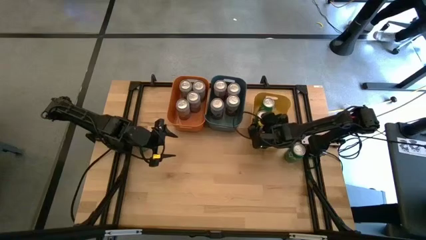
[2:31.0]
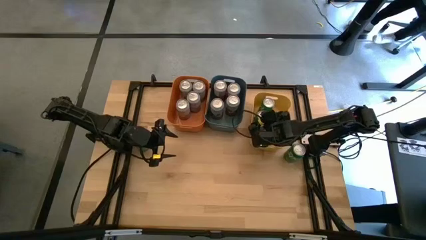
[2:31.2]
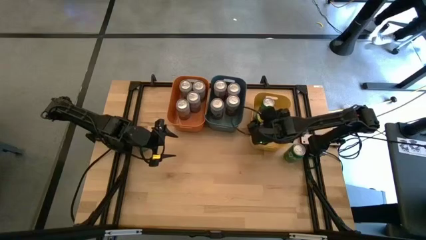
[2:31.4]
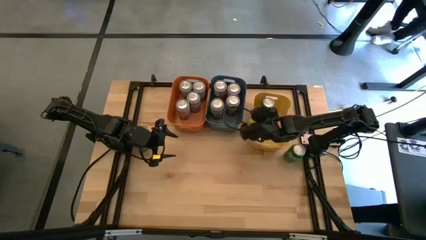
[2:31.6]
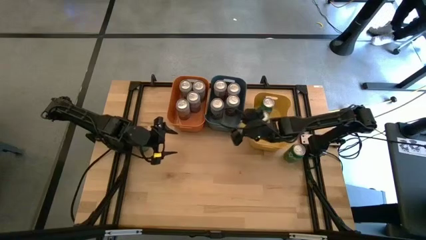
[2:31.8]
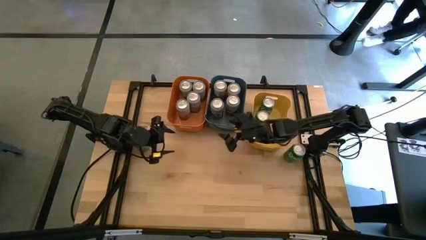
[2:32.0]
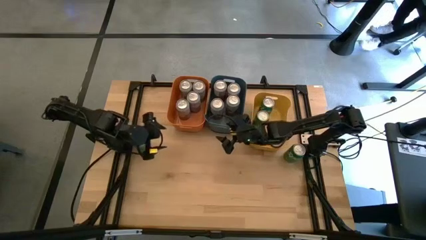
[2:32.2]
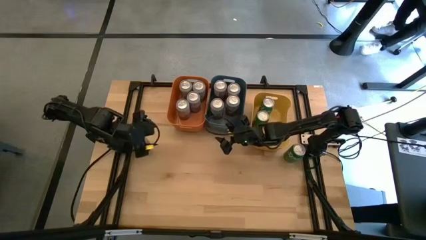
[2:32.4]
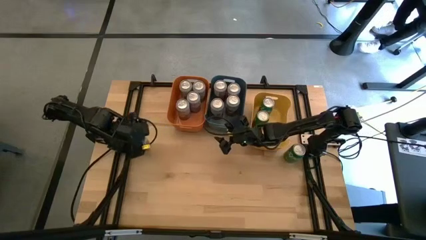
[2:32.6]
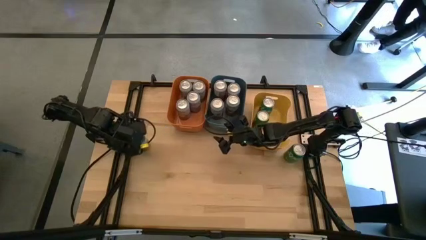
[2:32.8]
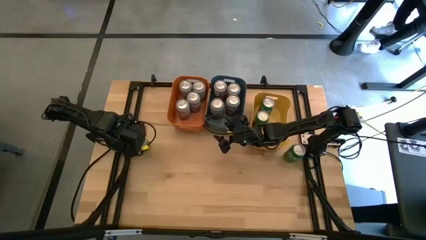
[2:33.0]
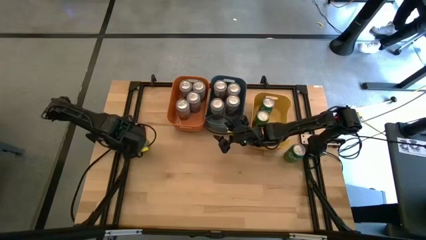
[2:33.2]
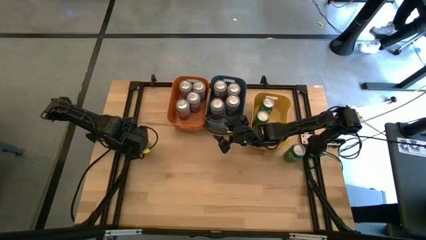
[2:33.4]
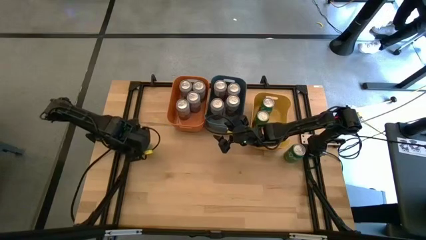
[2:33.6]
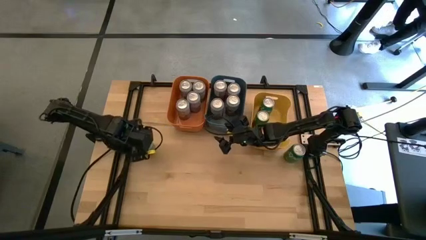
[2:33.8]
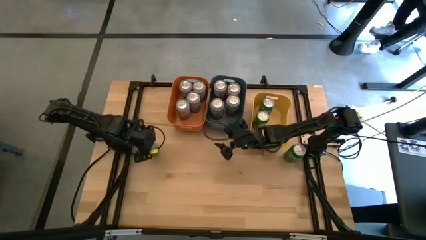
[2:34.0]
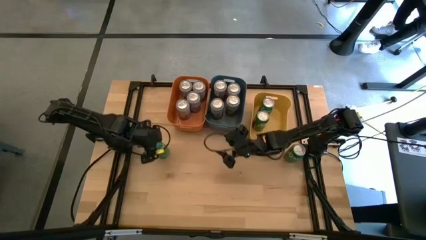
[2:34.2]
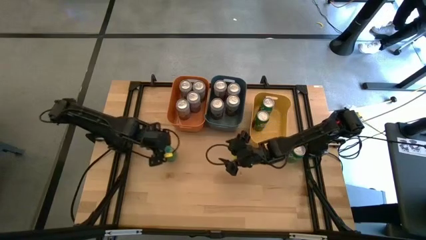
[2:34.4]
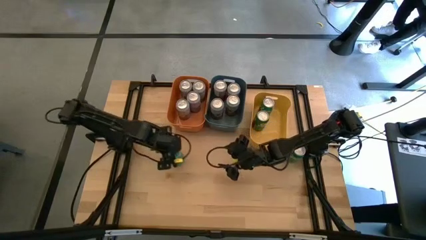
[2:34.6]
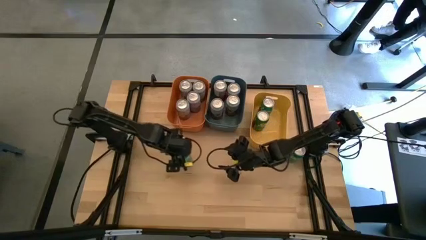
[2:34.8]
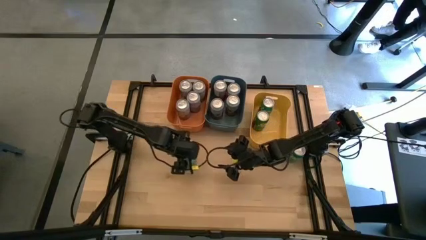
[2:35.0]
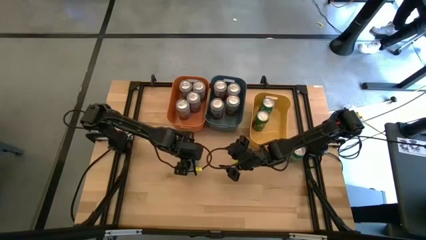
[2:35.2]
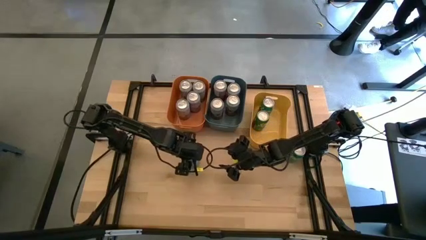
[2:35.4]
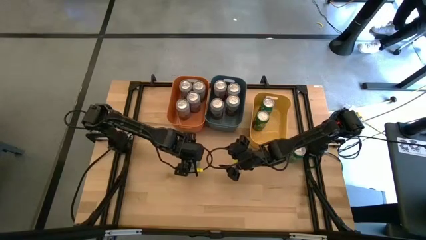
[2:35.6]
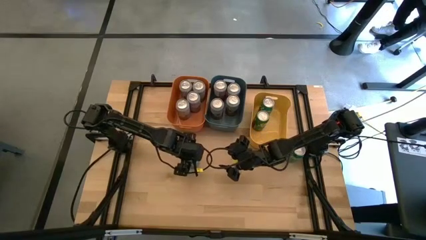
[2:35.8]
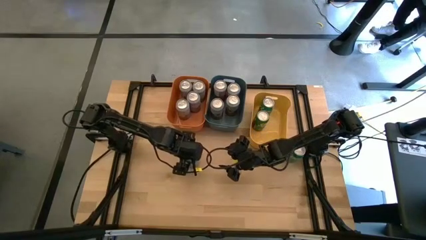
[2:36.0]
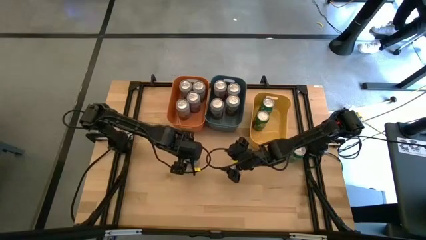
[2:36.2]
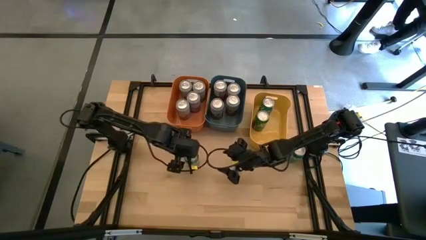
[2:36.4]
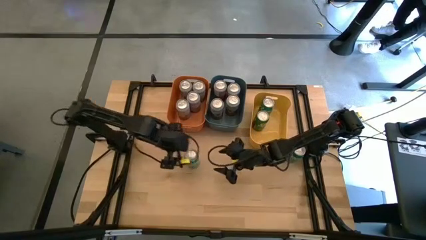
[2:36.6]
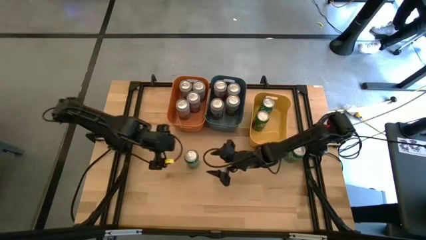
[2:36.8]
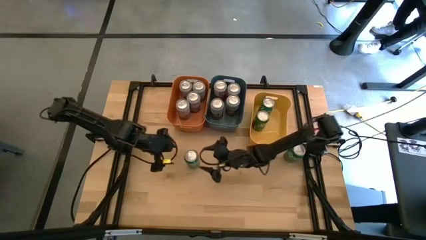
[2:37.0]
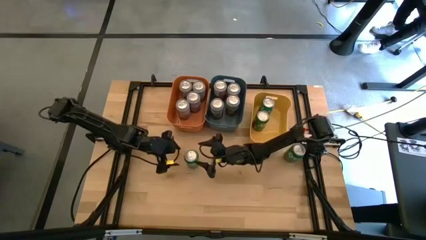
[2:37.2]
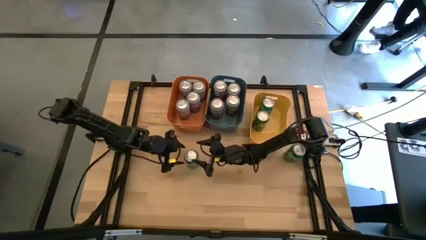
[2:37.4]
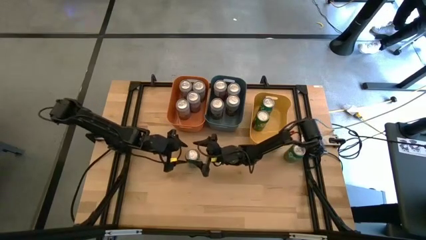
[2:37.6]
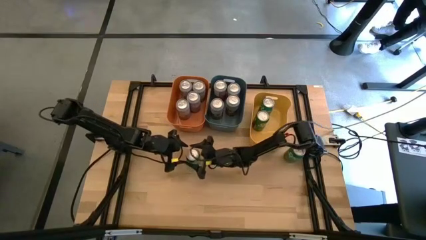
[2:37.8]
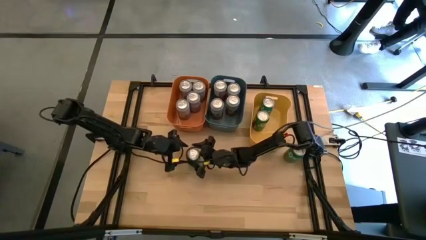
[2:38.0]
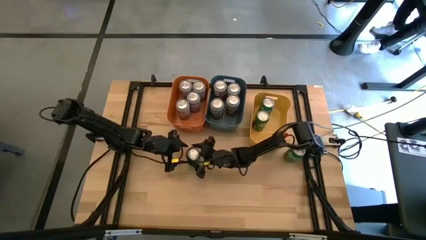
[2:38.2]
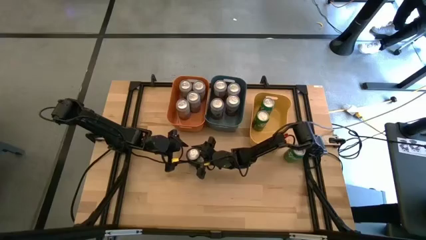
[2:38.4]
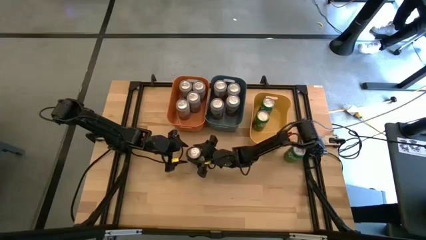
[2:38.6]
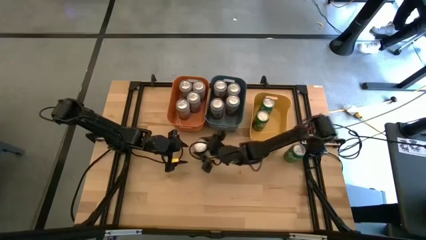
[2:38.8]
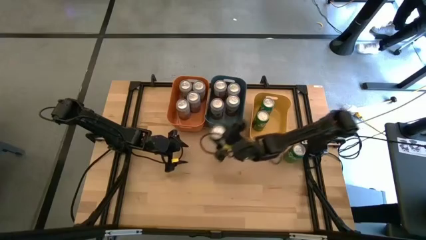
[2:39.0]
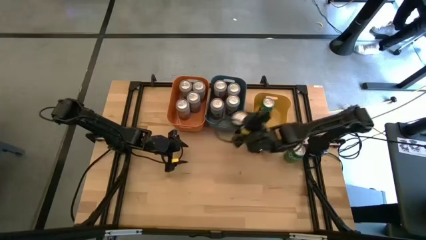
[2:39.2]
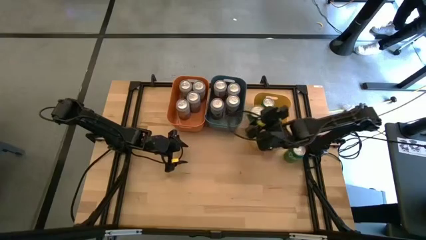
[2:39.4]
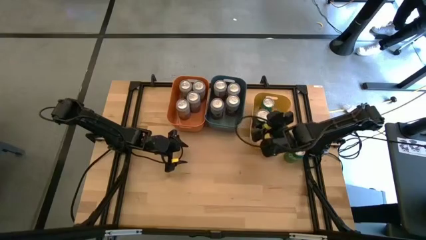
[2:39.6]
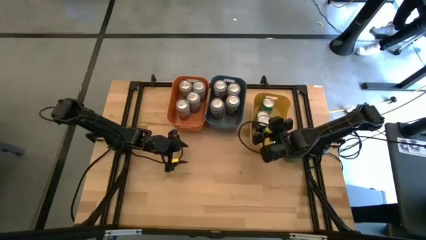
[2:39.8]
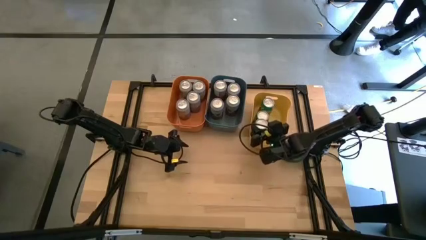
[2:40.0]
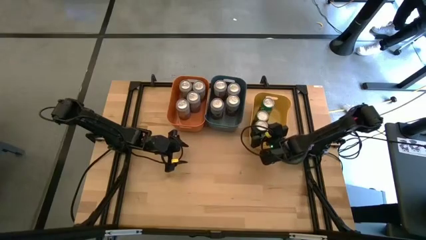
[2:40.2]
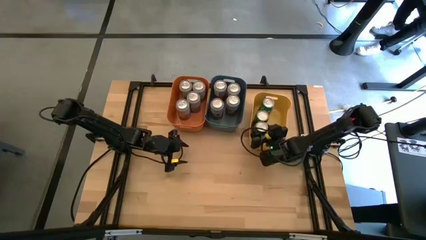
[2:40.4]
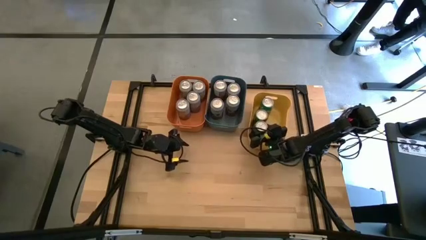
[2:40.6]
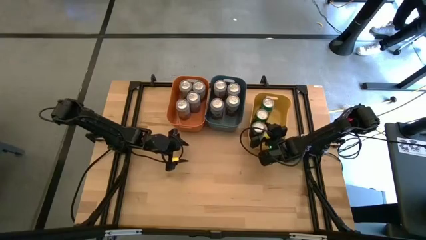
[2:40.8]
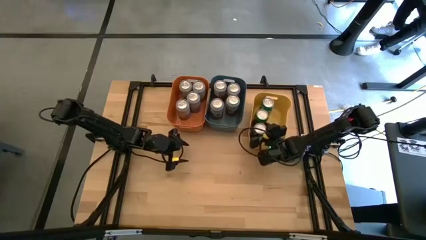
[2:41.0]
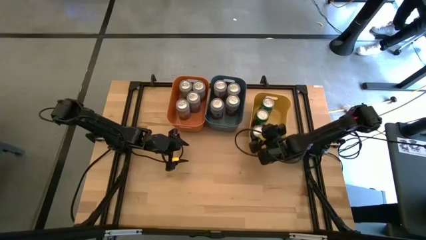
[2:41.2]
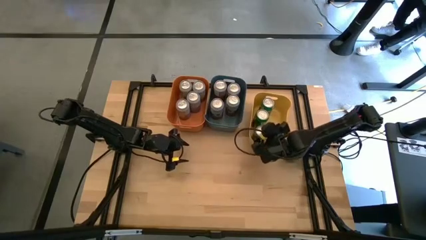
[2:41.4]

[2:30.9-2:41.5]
Task: Sort soda cans
Put the left green soda can into the yellow bin

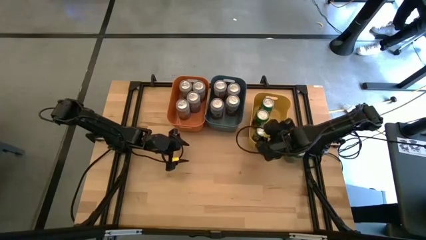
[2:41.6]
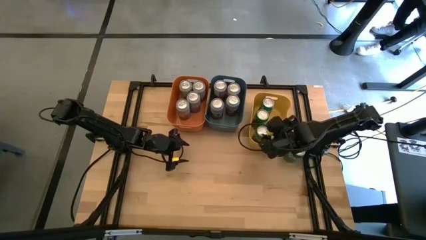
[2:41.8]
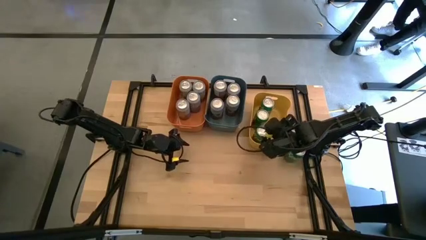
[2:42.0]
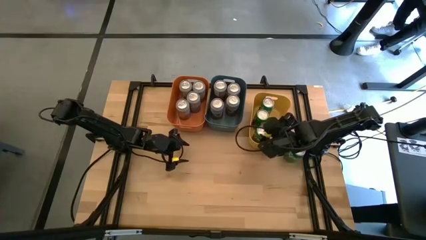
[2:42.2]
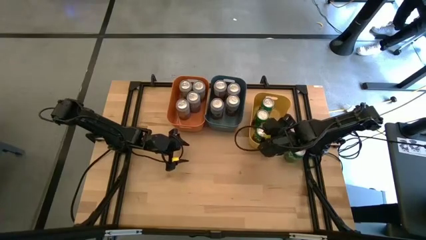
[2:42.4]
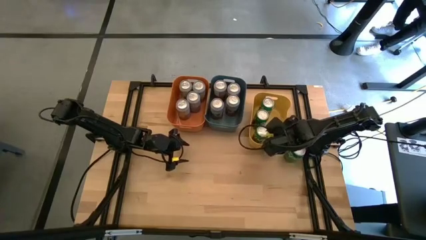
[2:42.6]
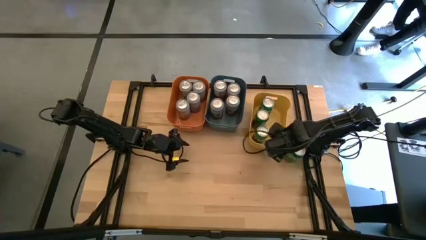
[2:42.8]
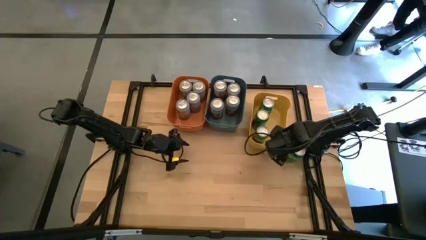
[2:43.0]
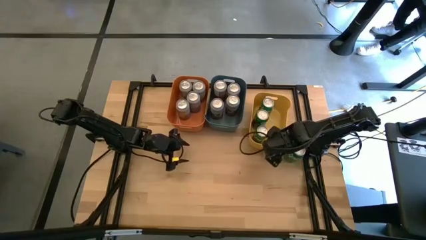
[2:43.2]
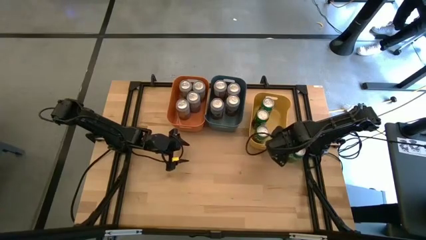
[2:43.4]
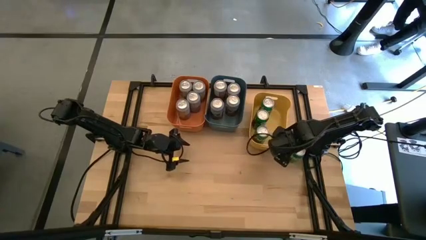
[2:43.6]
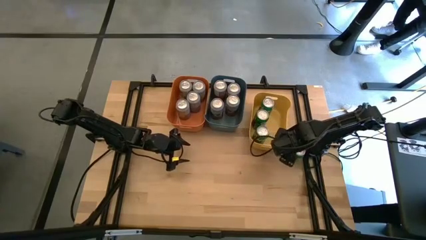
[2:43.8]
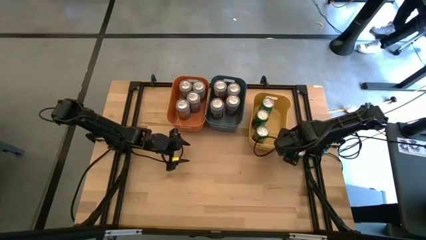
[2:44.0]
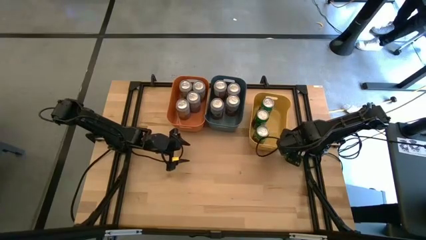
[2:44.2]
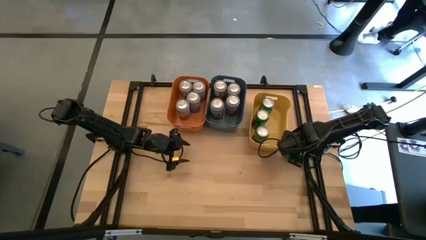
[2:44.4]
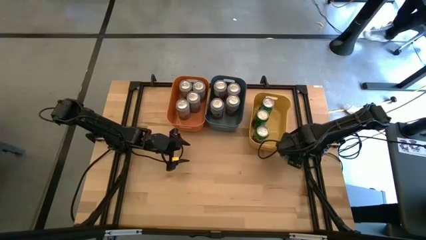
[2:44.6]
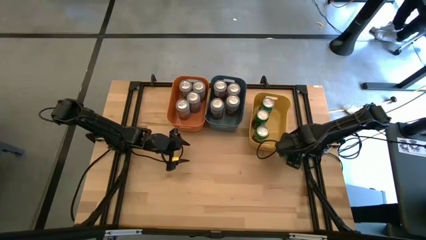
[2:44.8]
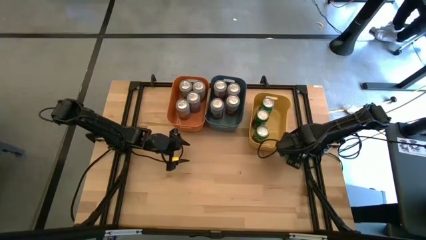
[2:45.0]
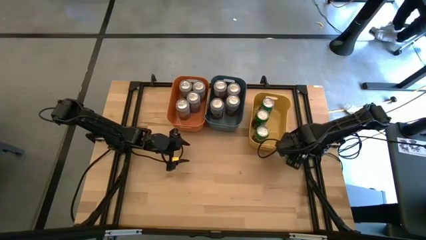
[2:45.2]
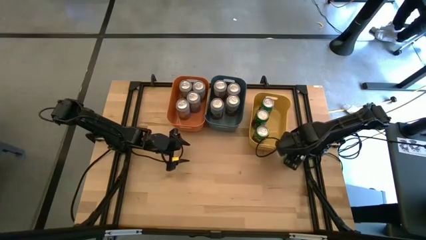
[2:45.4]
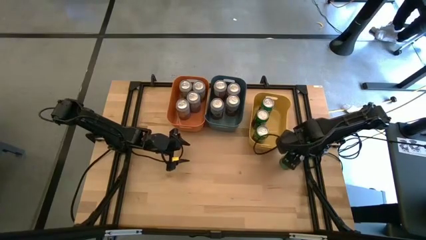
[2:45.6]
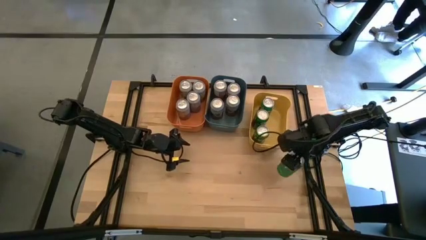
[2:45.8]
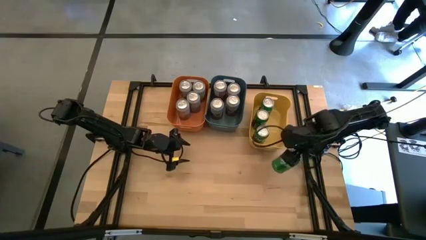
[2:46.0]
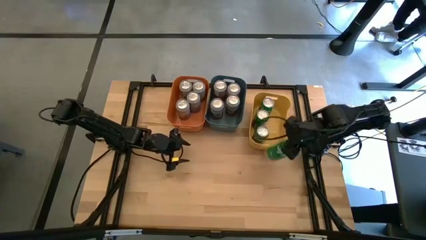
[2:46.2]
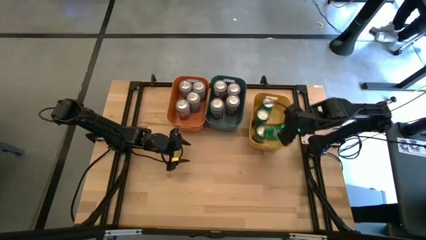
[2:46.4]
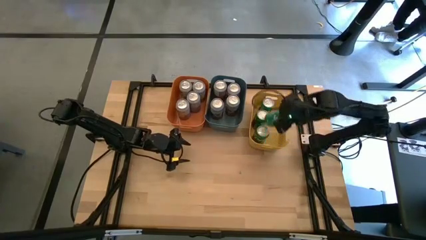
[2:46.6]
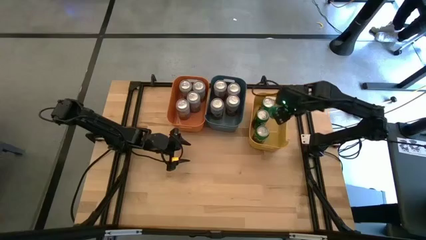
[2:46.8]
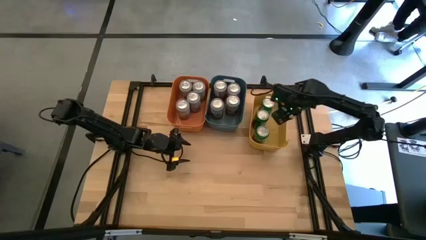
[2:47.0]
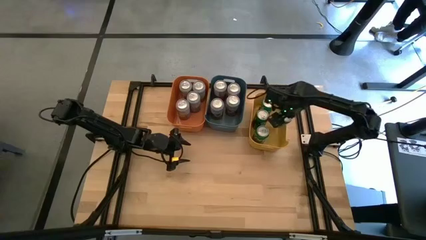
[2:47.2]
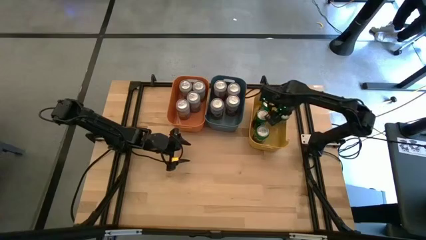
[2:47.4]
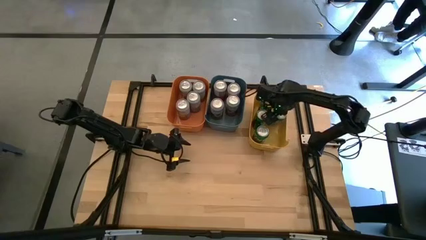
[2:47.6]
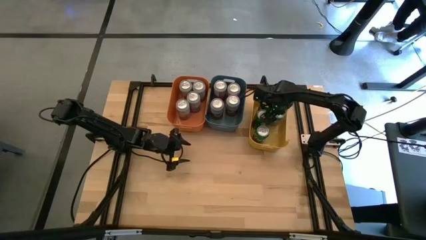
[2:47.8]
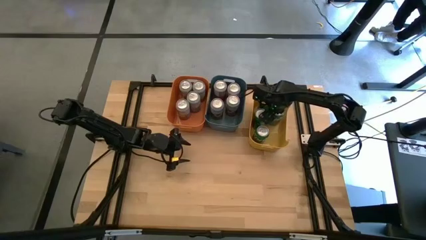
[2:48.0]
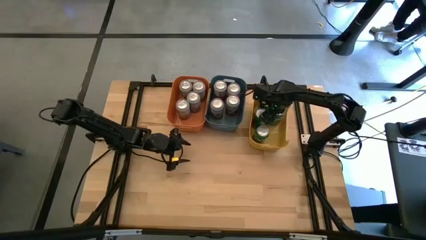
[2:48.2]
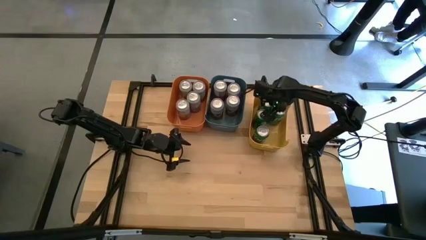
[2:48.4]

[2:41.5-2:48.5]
Put the green soda can into the yellow bin
